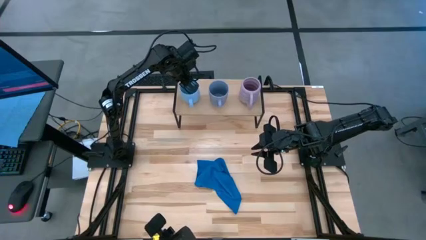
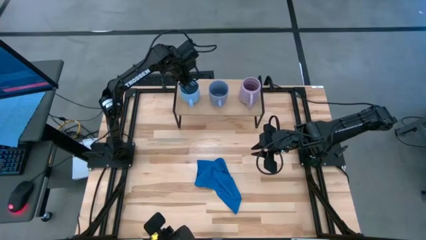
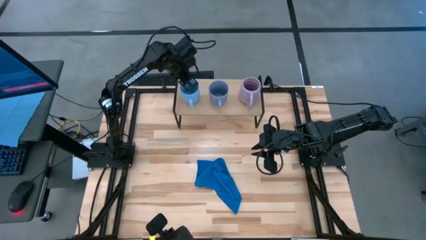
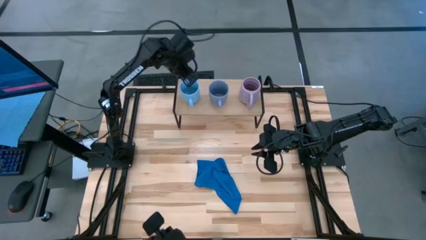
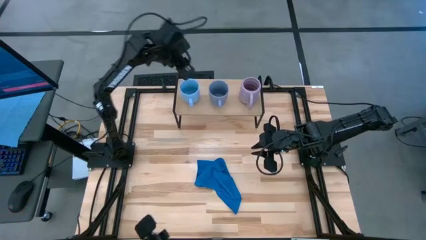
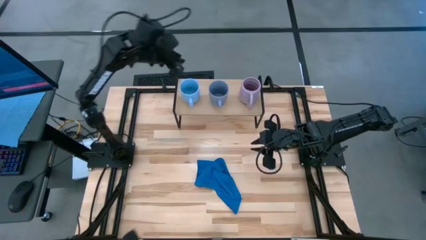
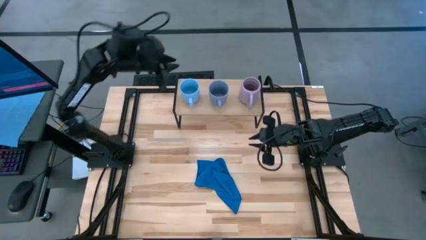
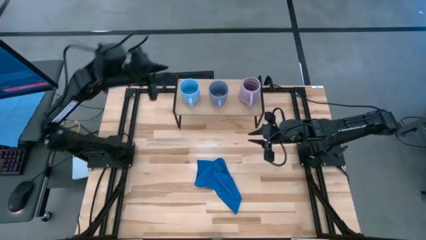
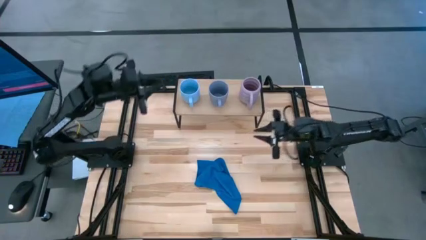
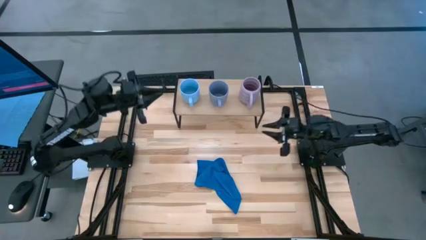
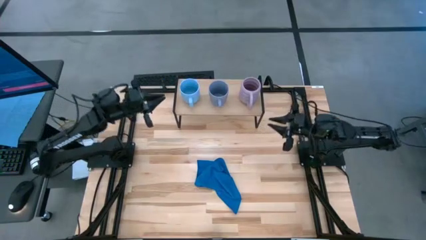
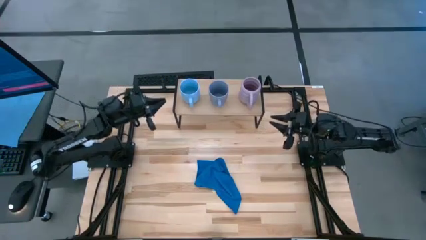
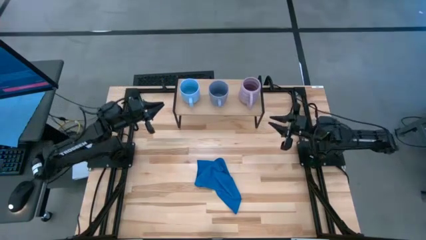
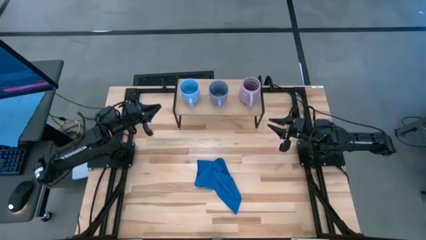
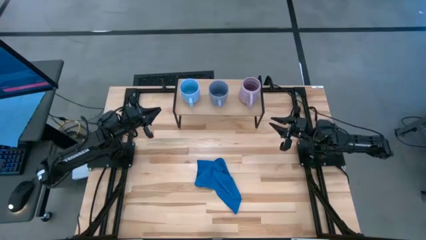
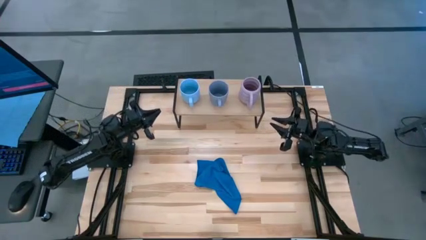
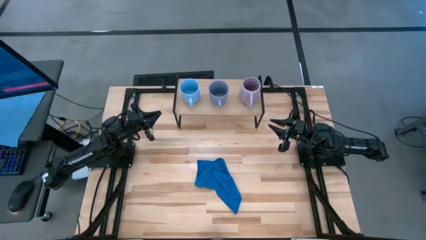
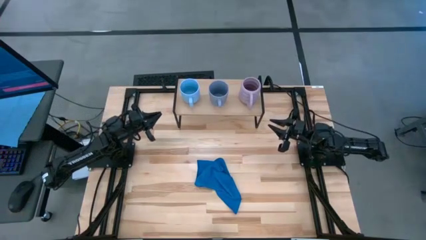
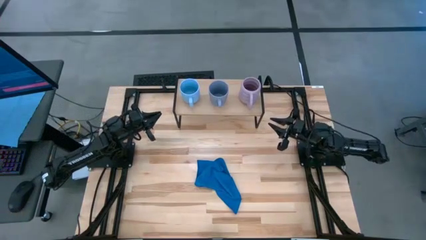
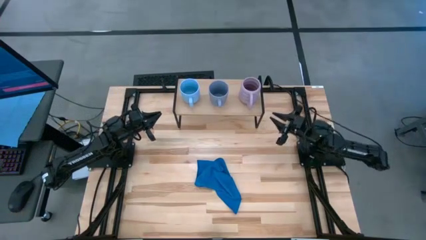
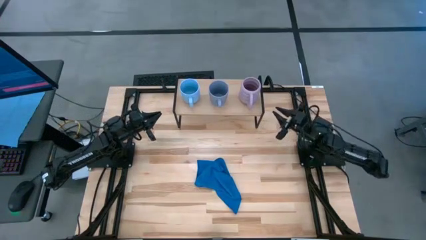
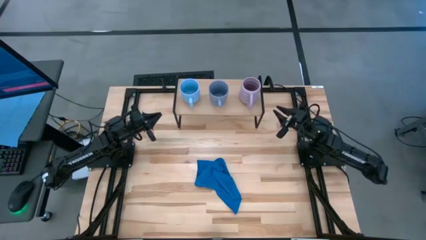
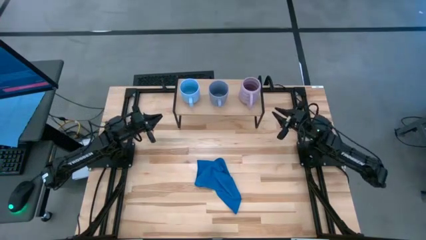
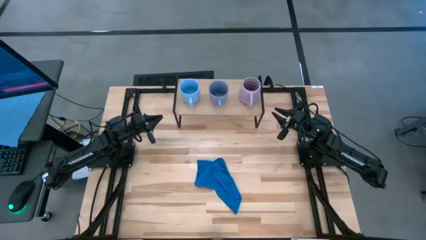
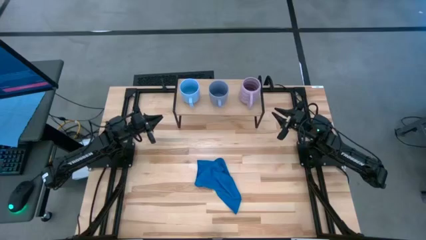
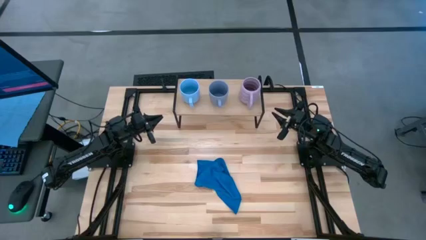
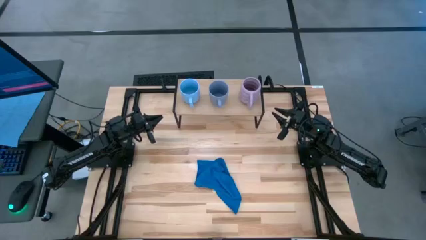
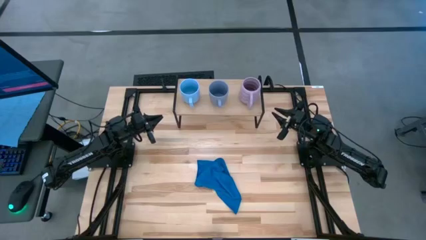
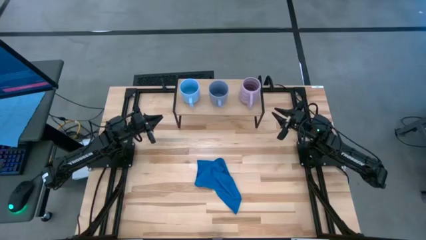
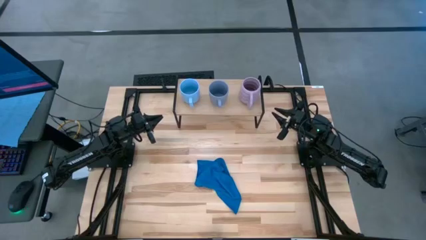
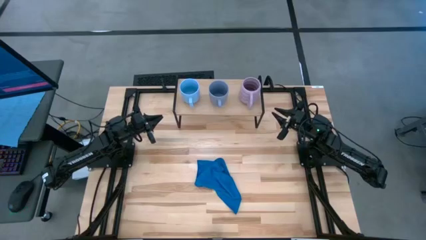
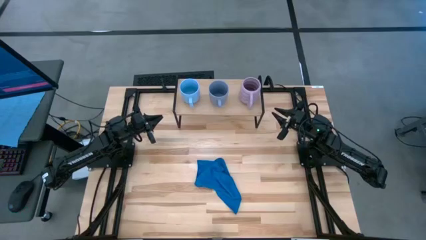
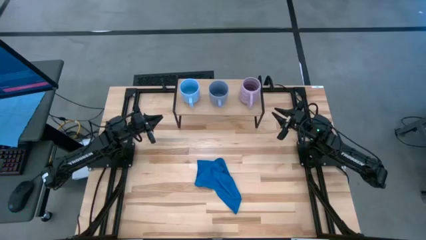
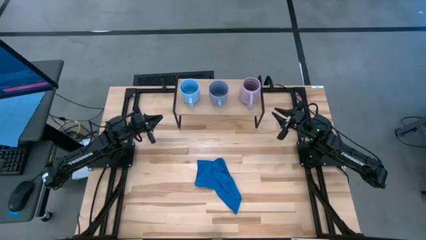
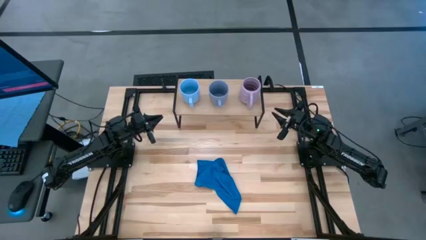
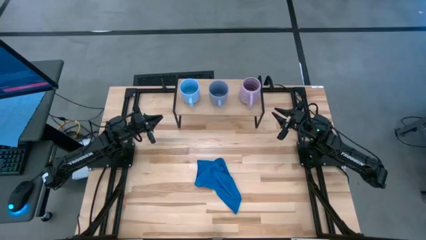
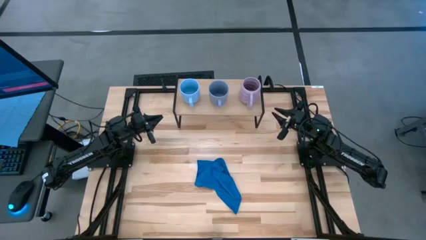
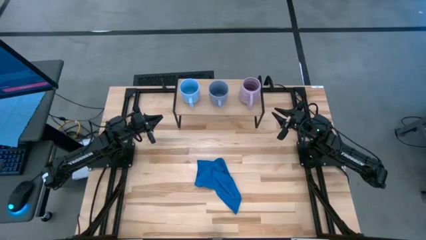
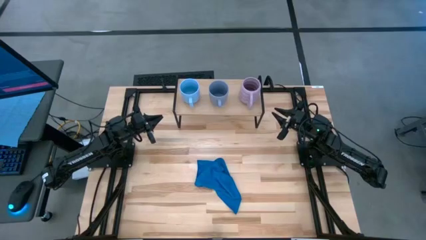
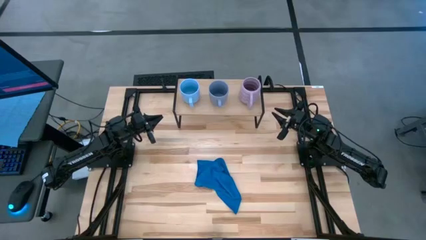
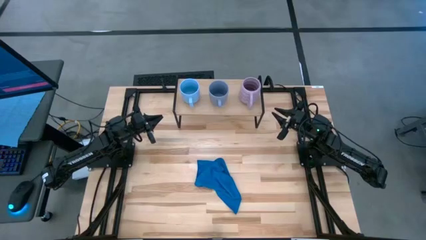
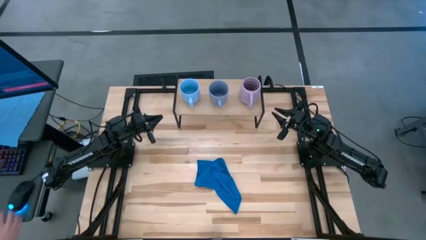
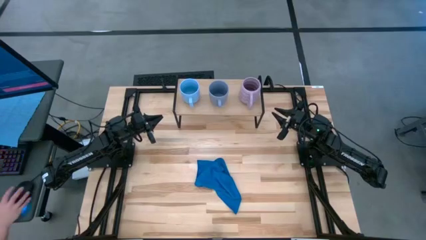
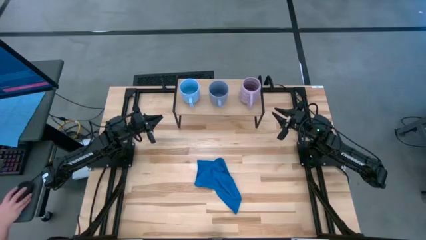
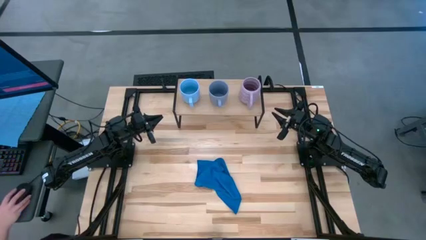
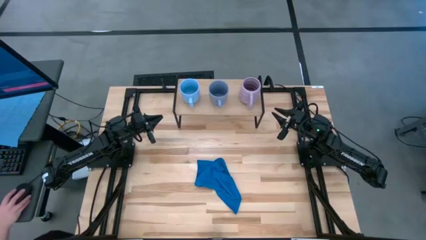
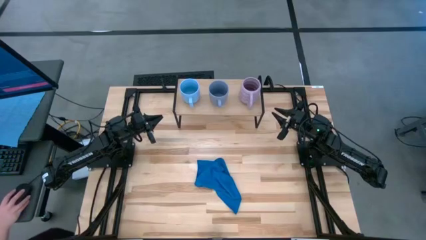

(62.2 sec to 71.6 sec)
Task: Stack small to large cups/mugs on shelf
Return to Home Position
